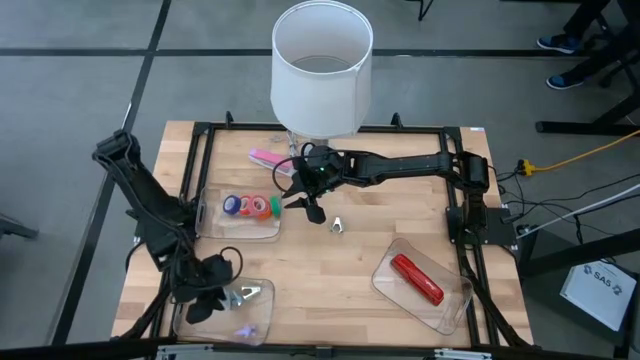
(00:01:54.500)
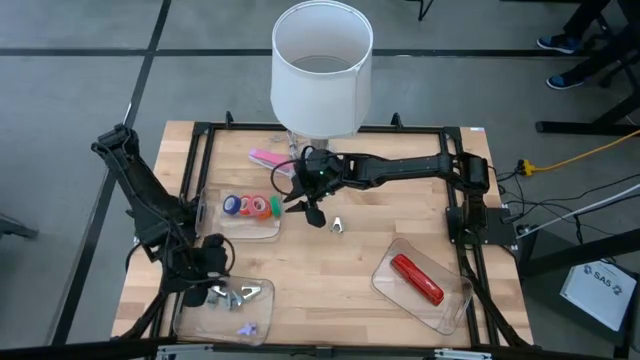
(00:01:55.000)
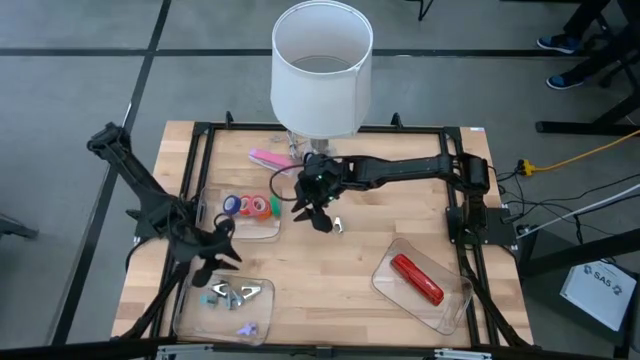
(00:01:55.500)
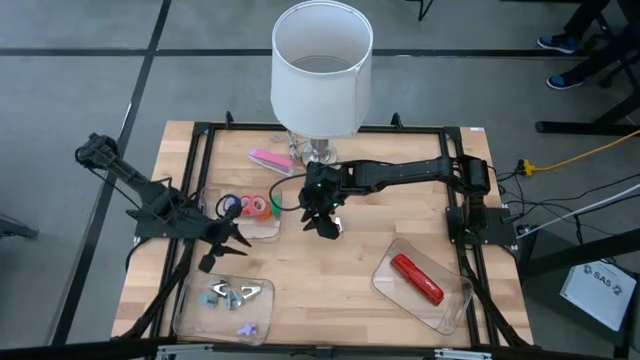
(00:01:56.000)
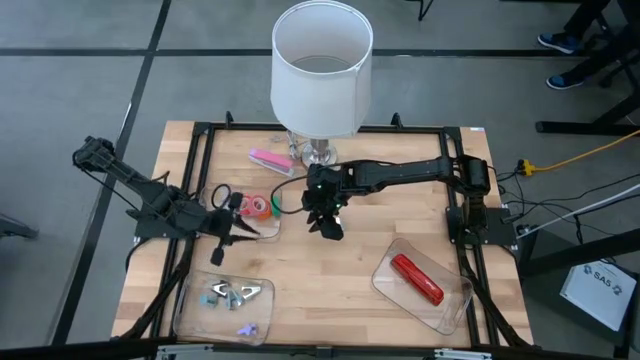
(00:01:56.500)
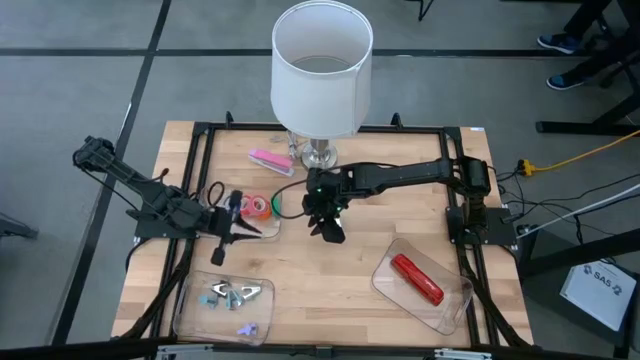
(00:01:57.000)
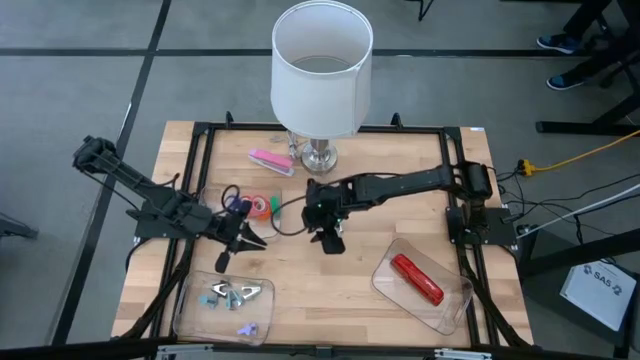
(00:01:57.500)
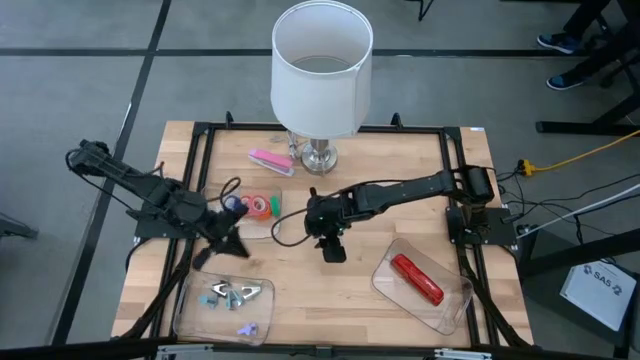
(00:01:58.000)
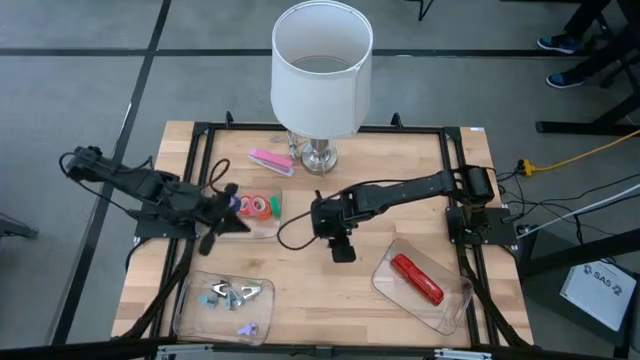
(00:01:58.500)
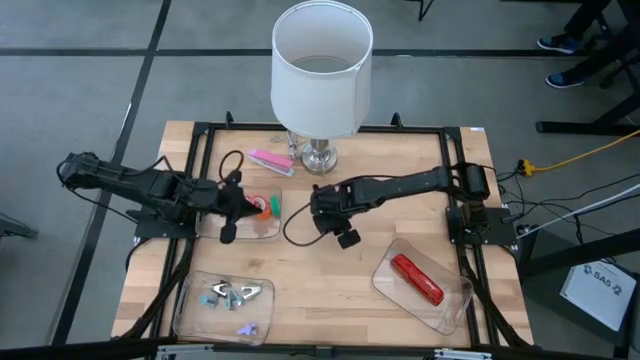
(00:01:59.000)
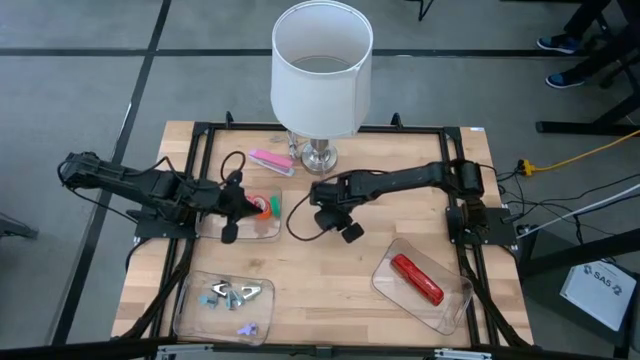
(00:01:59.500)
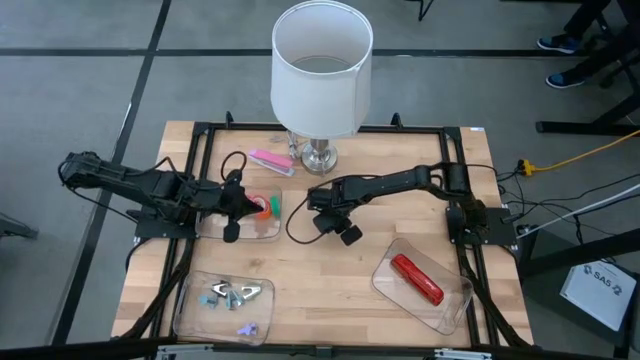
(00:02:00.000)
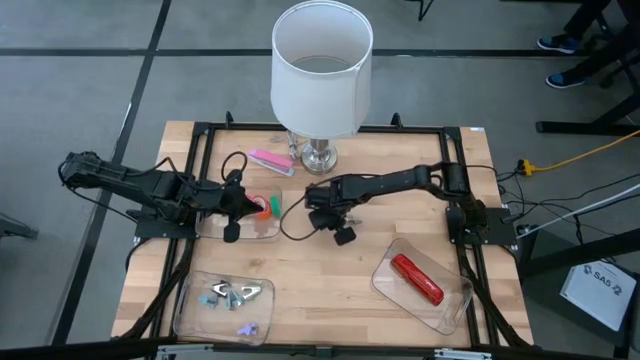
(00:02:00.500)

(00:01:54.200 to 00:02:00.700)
Task: Pick and place Stapler, Stapler remover, tape
Put the gray staple remover into the bottom left transparent bin

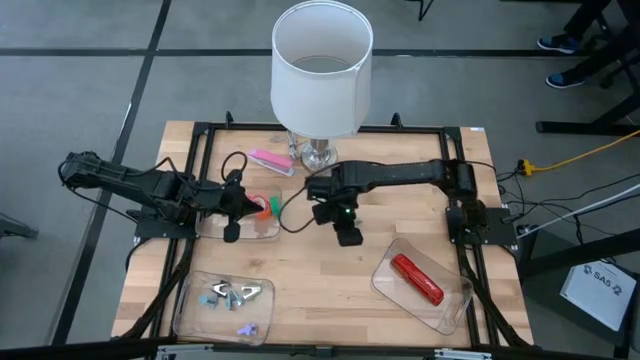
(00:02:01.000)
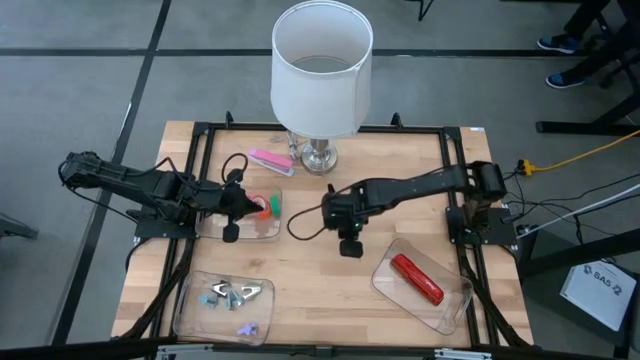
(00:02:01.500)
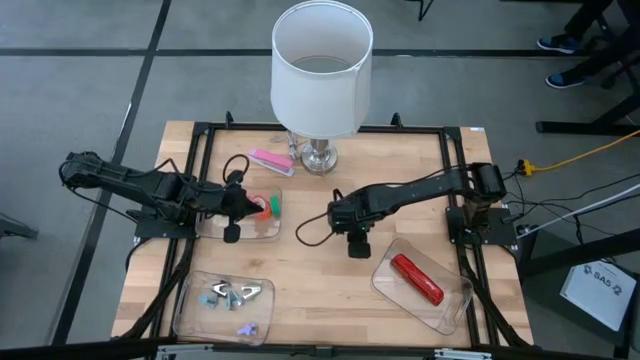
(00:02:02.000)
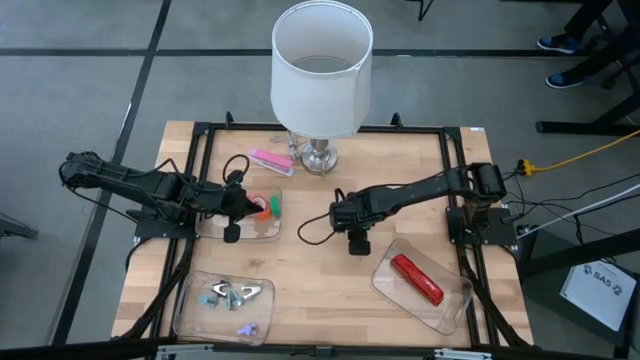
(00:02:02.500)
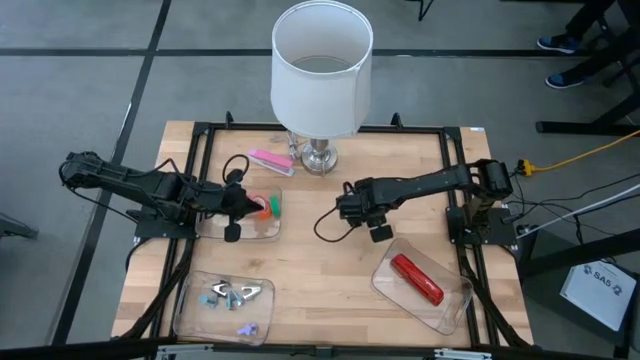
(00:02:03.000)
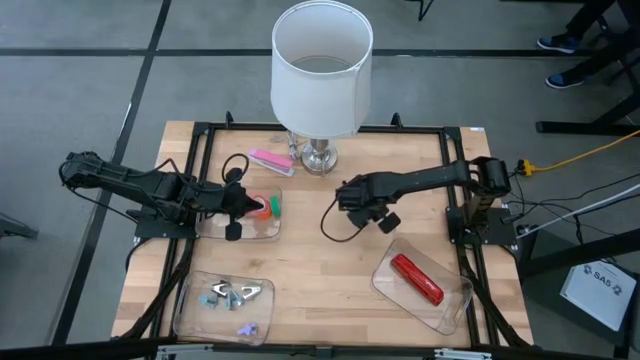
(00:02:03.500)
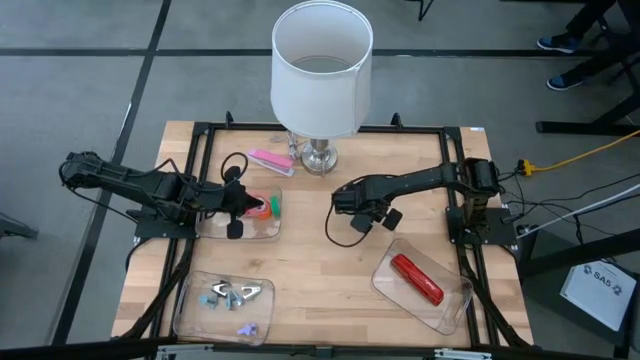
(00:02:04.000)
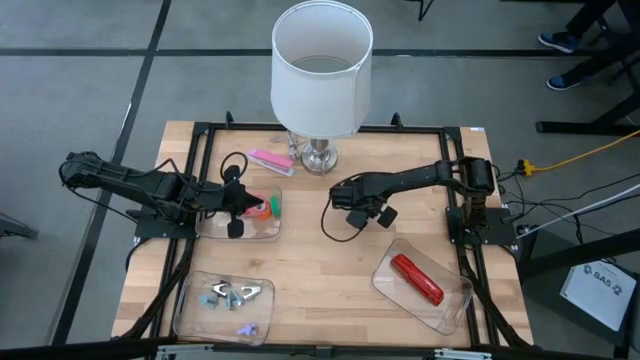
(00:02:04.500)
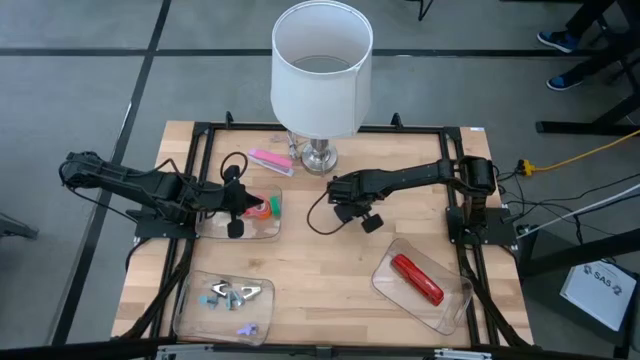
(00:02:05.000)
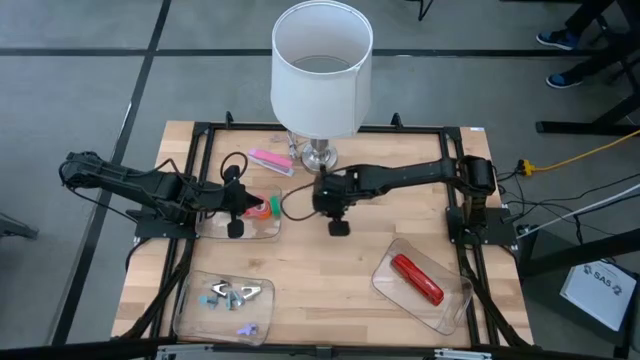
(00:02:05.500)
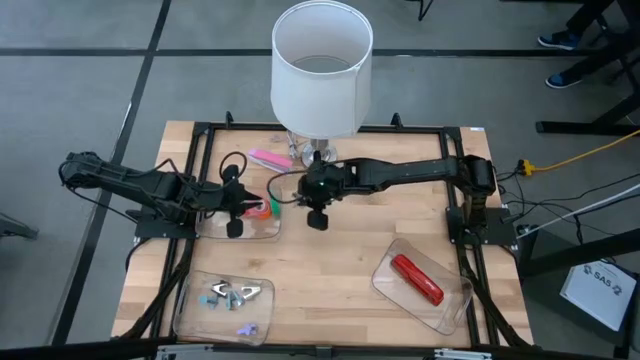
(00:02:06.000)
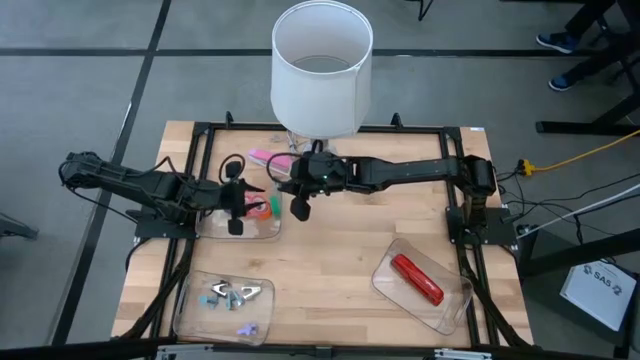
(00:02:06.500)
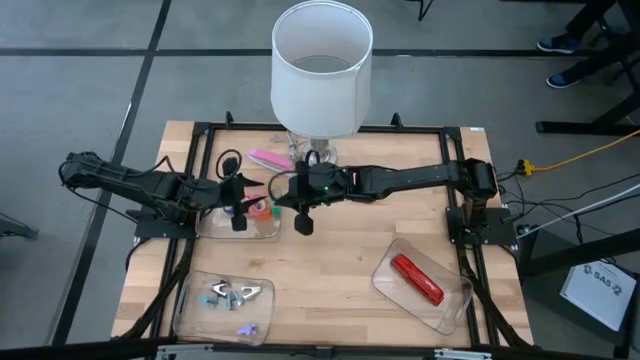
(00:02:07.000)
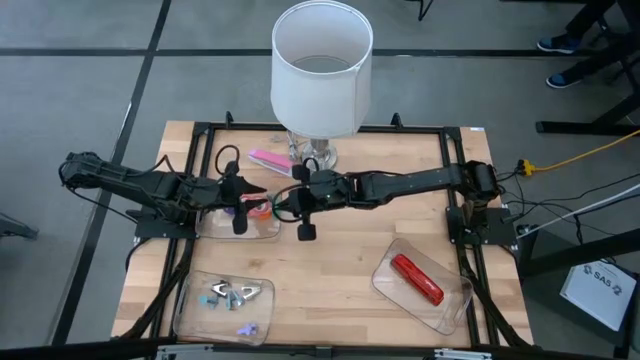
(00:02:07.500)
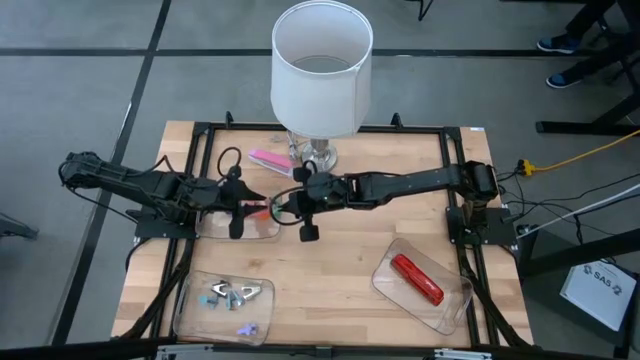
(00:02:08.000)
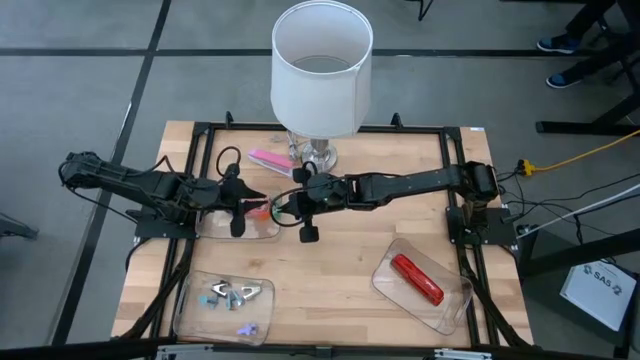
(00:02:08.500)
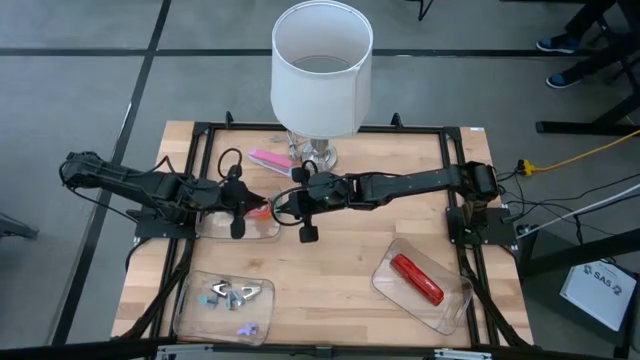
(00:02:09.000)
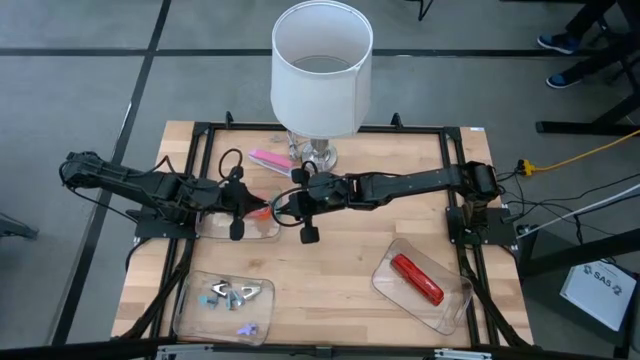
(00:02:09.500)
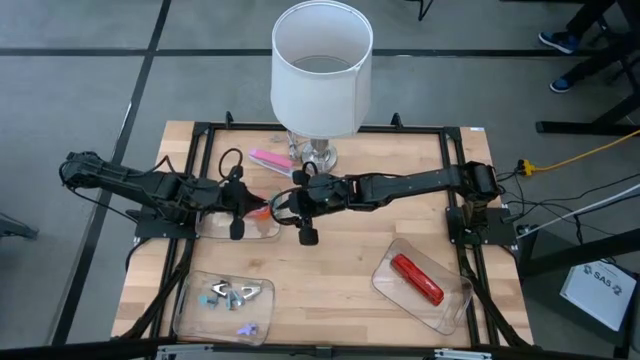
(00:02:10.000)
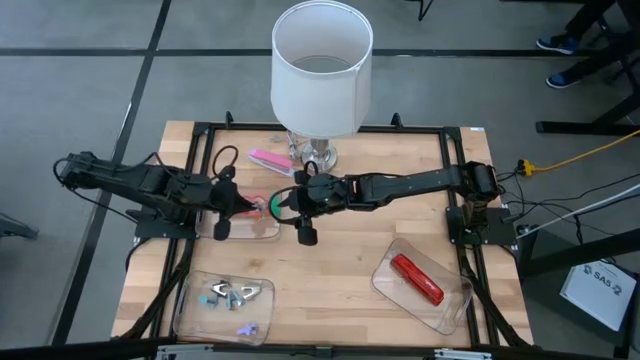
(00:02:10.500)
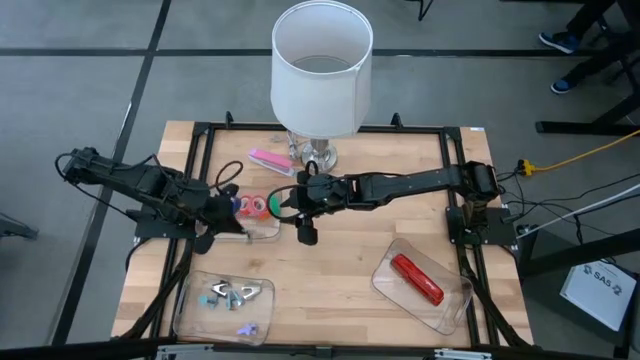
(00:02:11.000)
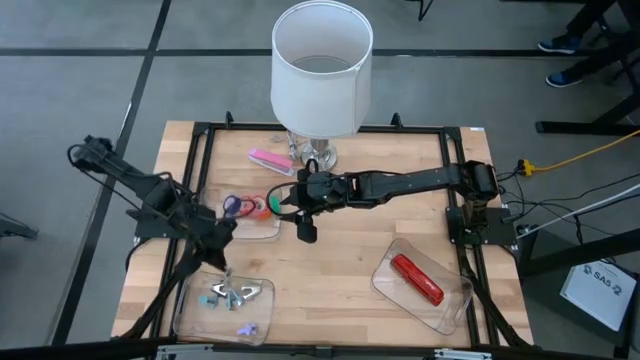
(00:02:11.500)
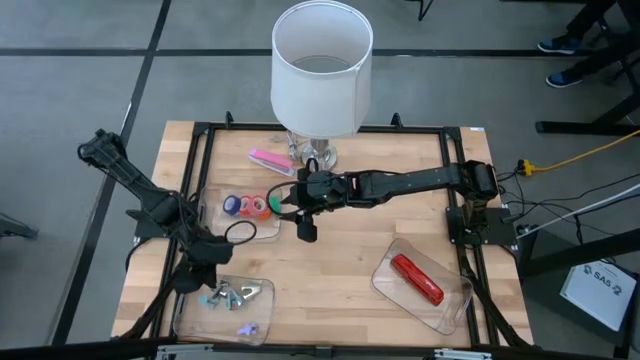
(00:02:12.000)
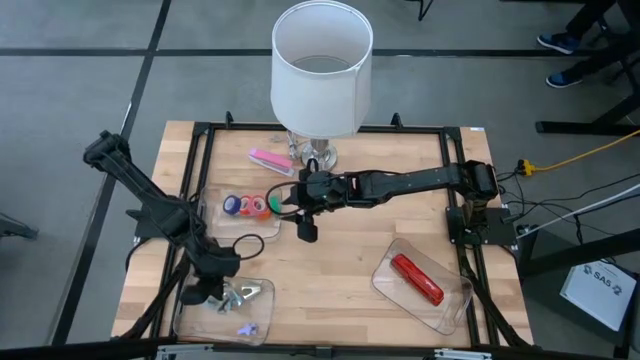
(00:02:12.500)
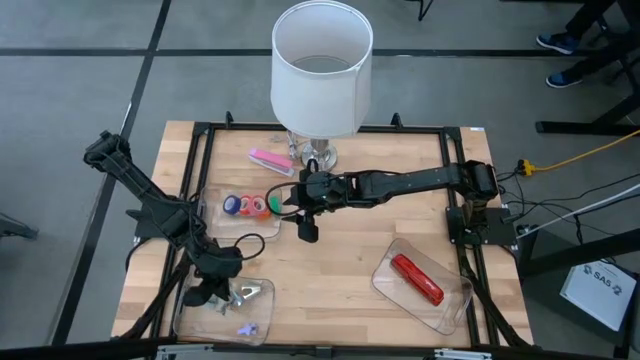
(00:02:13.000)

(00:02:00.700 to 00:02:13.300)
Put the gray staple remover into the bottom left transparent bin

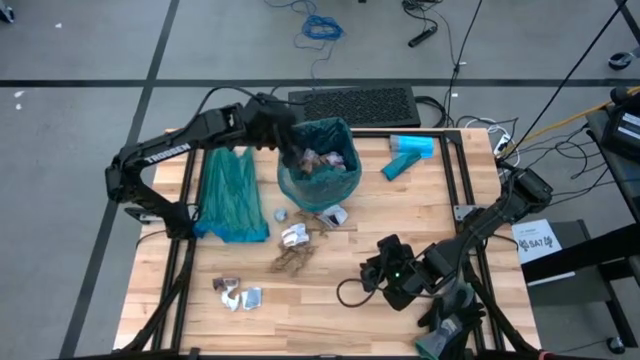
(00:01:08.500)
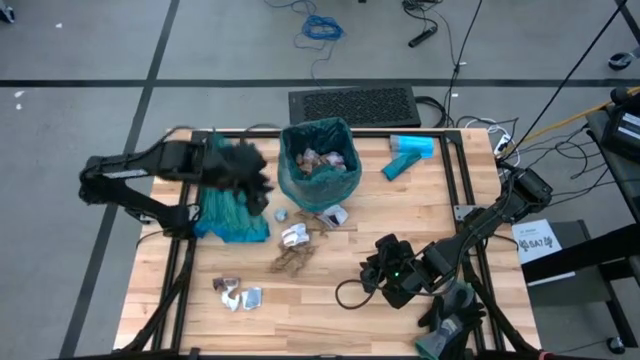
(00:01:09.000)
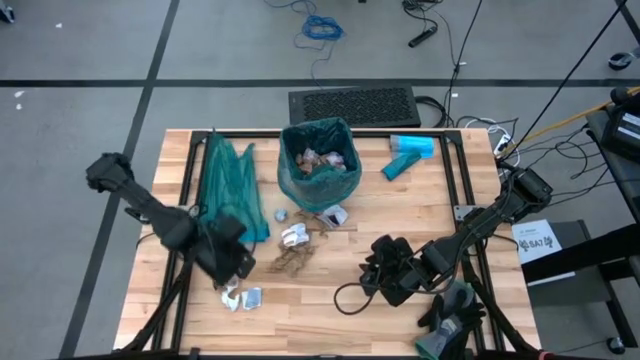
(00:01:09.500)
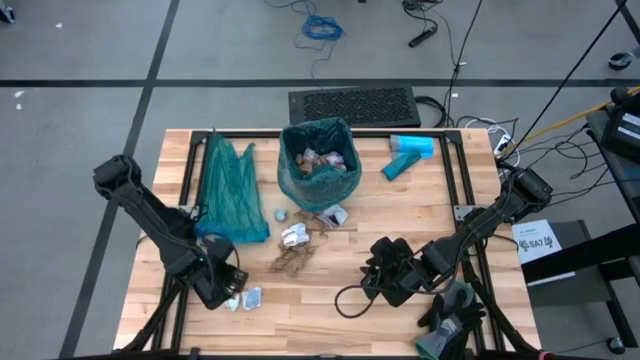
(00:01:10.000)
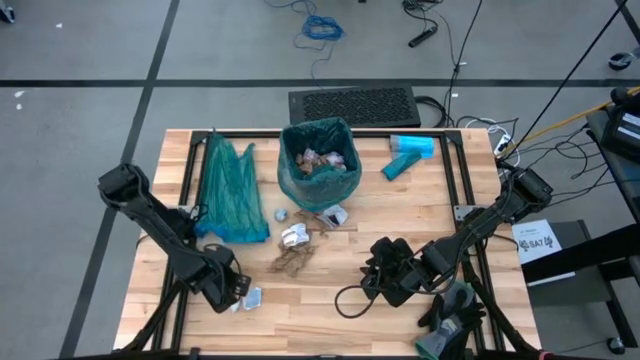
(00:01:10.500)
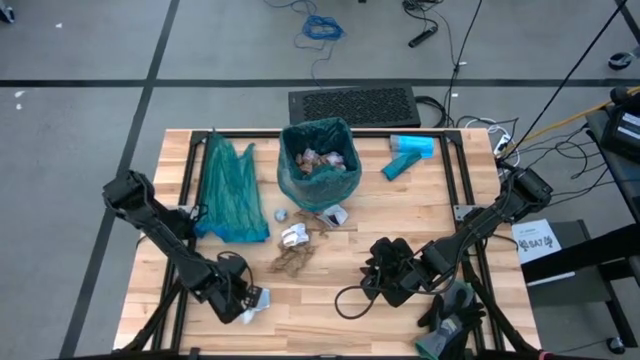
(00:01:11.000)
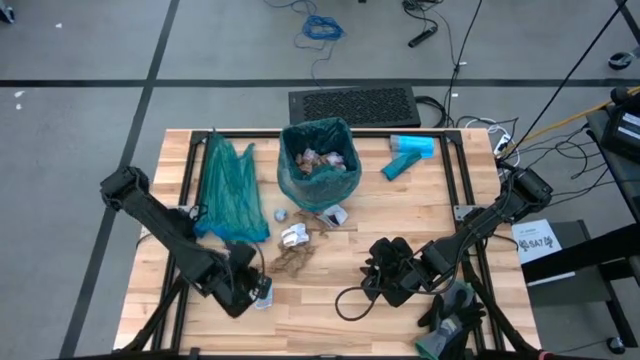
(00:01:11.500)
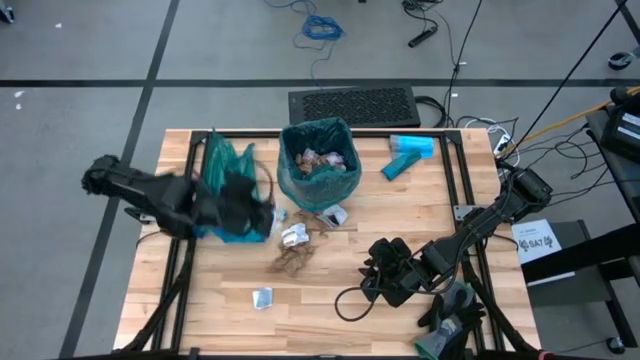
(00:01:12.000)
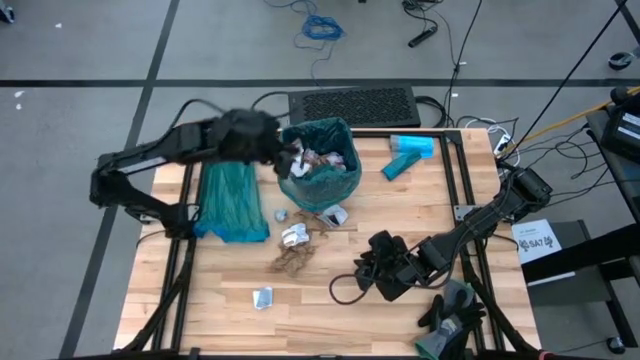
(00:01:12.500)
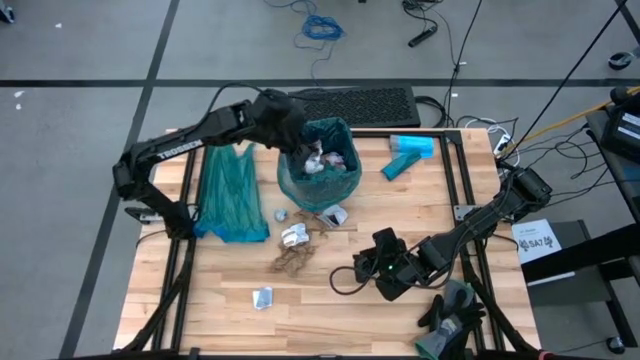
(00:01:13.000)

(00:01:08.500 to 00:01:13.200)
Task: place trash/remove bag and relplace
Put the white paper into the blue trash bag inside the black trash bin
